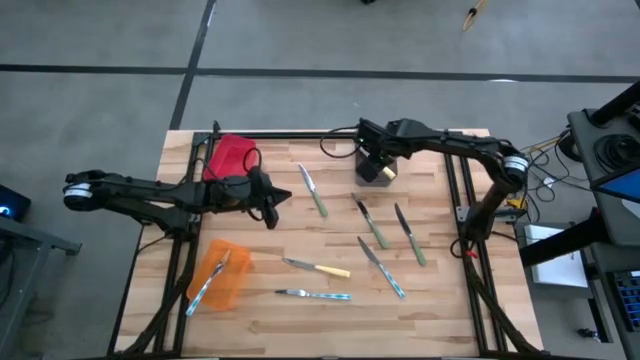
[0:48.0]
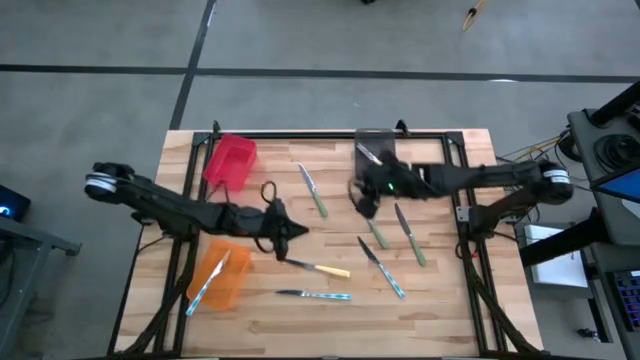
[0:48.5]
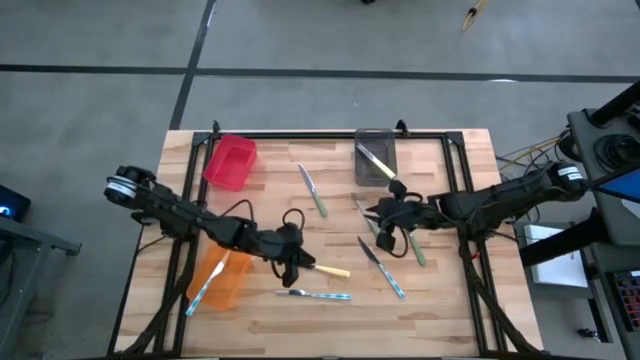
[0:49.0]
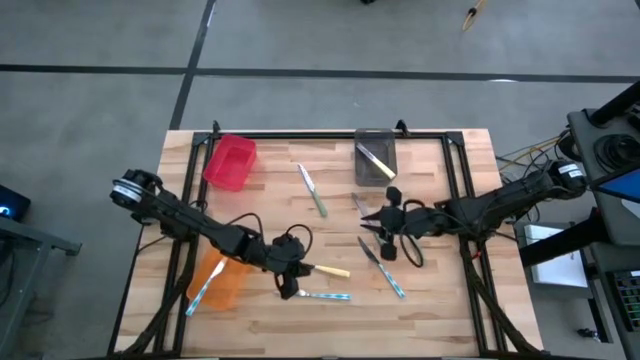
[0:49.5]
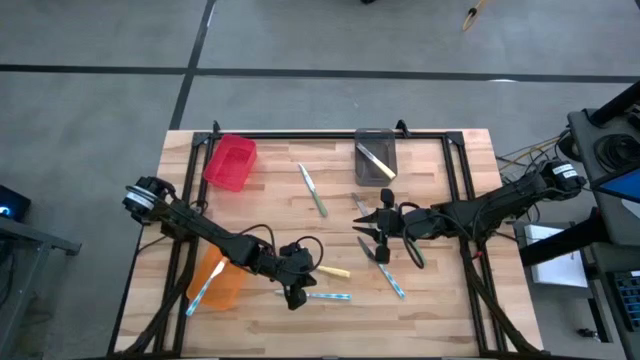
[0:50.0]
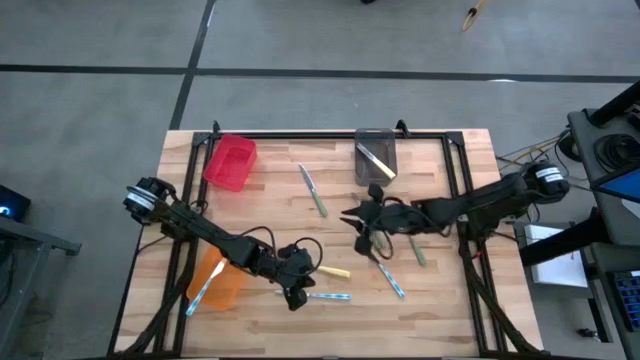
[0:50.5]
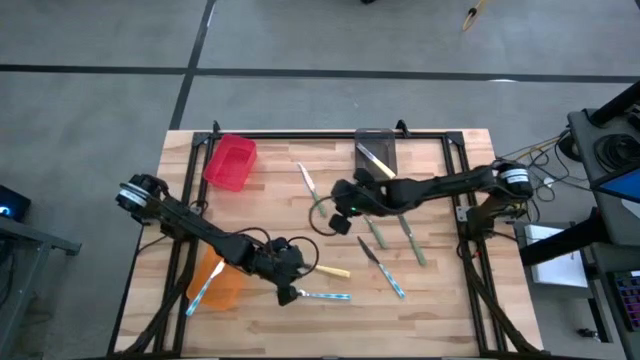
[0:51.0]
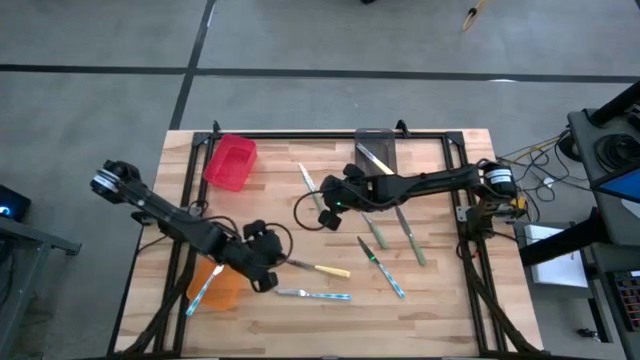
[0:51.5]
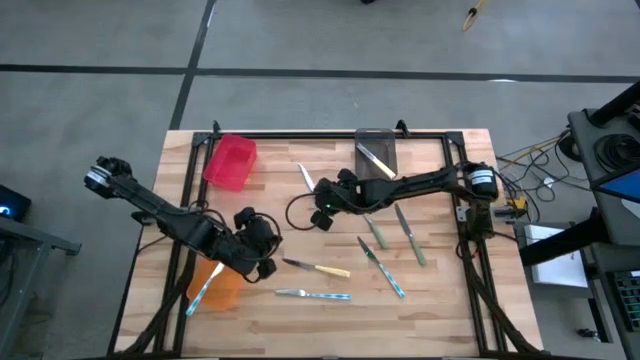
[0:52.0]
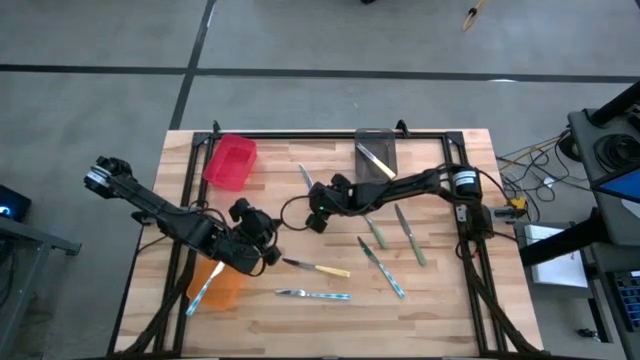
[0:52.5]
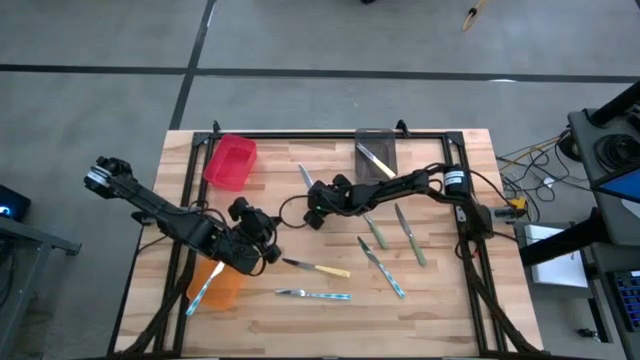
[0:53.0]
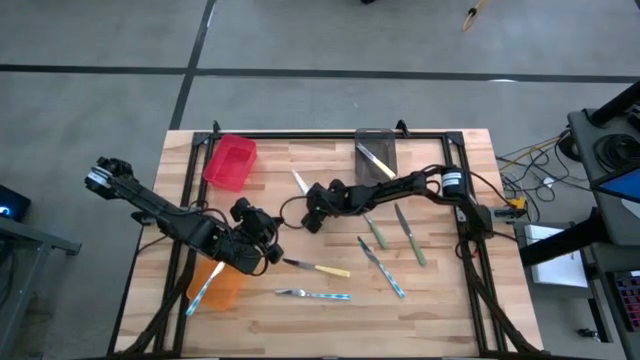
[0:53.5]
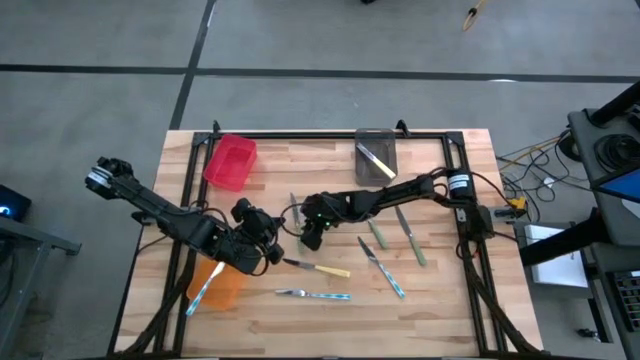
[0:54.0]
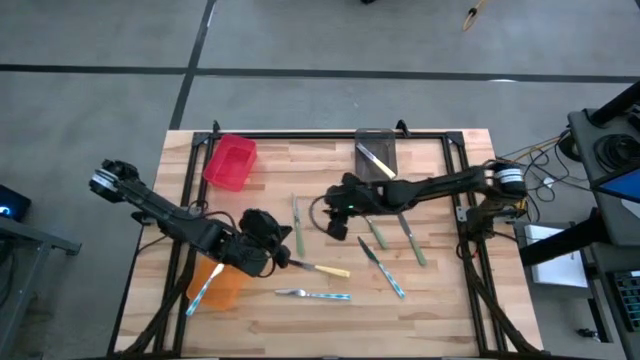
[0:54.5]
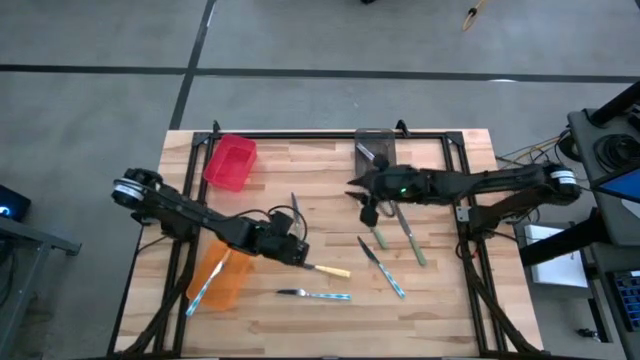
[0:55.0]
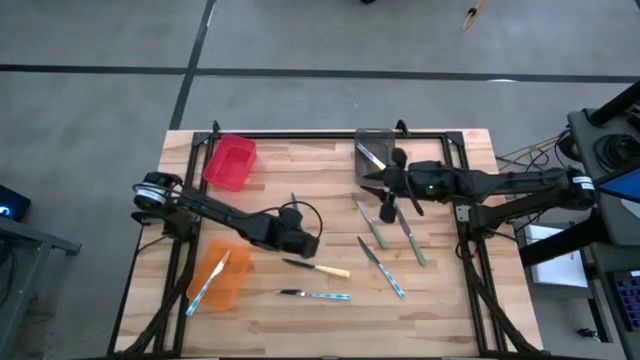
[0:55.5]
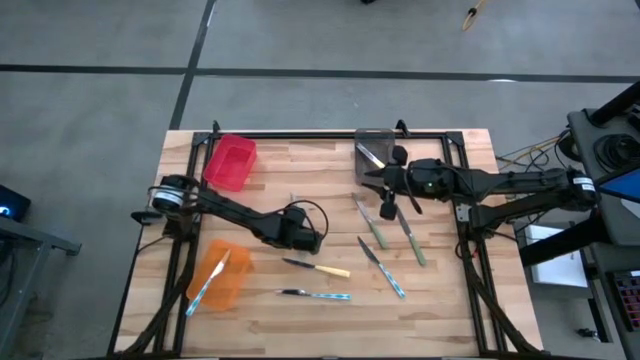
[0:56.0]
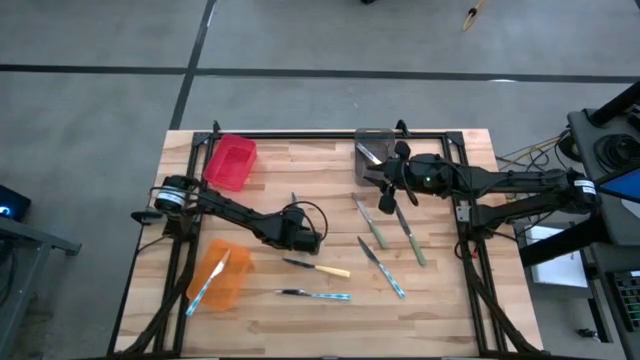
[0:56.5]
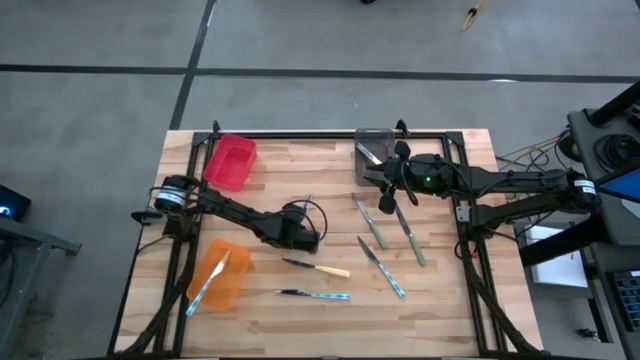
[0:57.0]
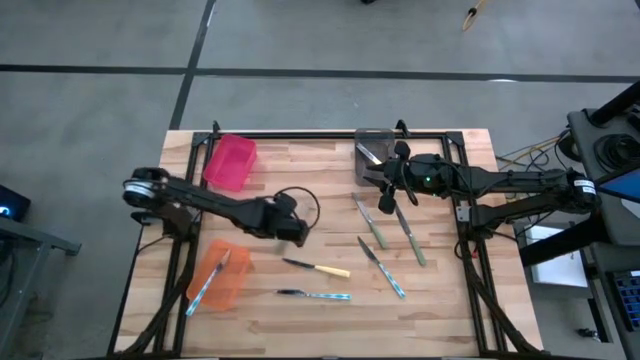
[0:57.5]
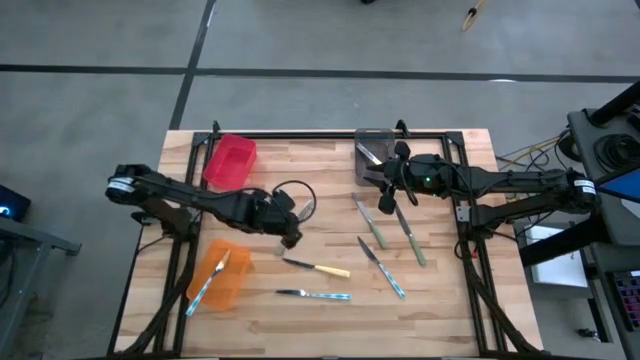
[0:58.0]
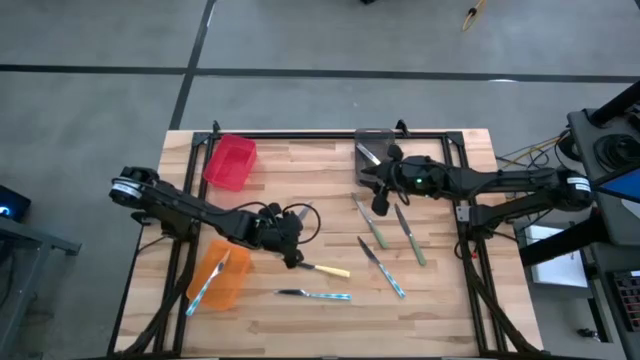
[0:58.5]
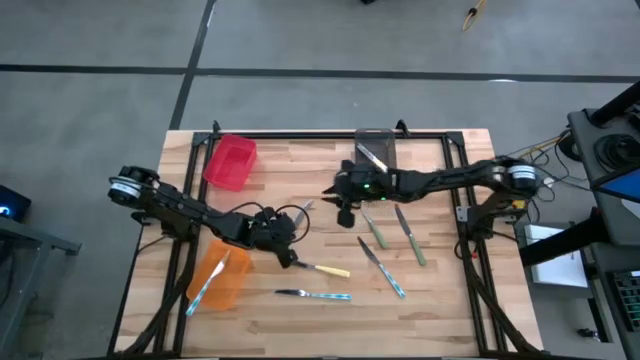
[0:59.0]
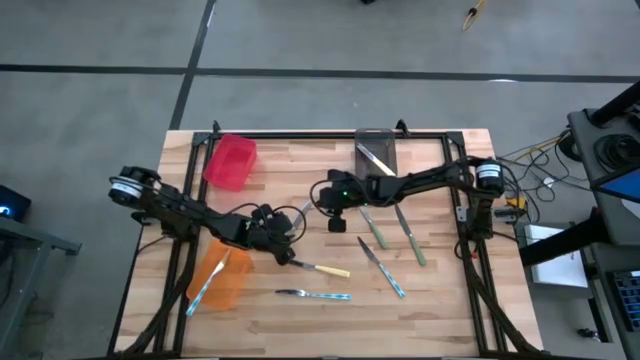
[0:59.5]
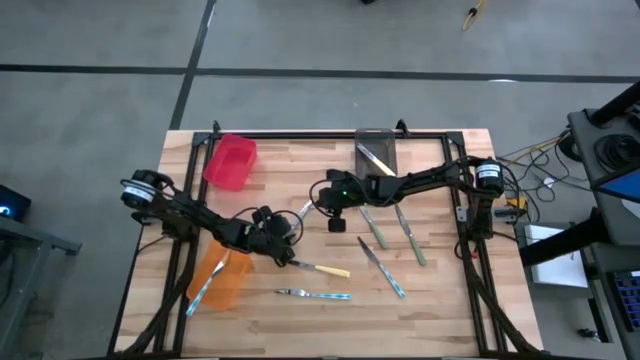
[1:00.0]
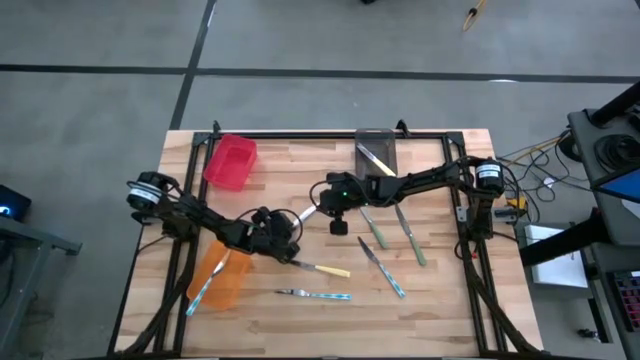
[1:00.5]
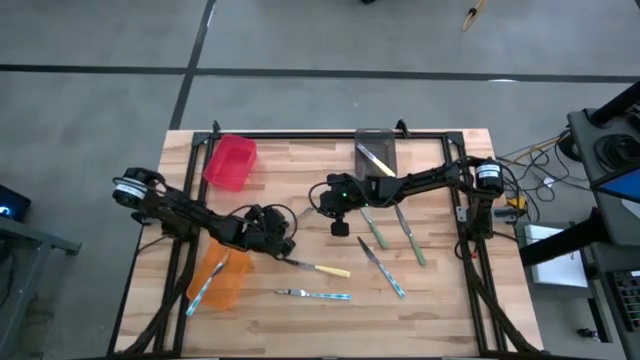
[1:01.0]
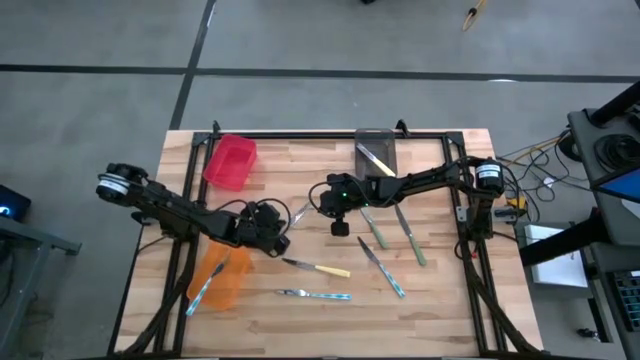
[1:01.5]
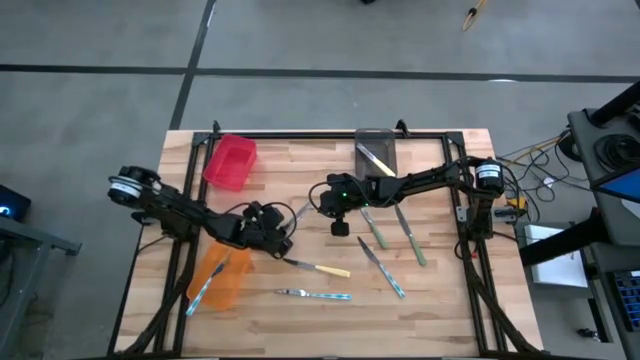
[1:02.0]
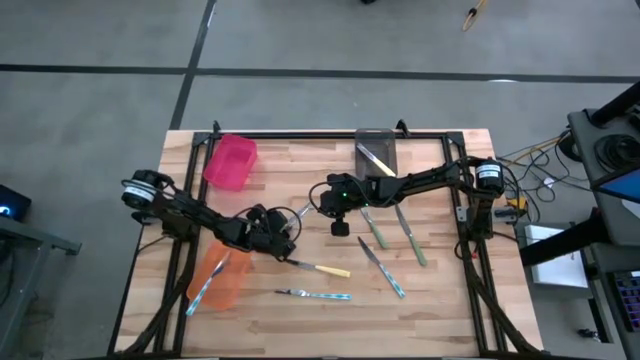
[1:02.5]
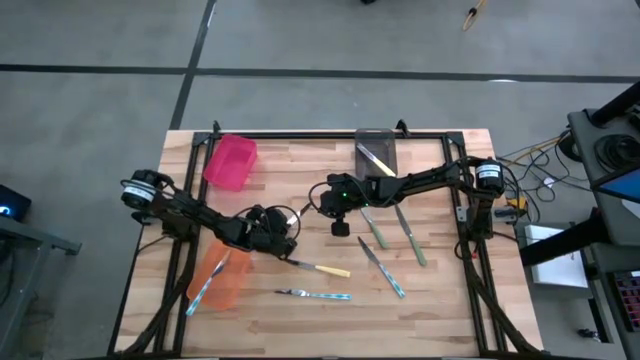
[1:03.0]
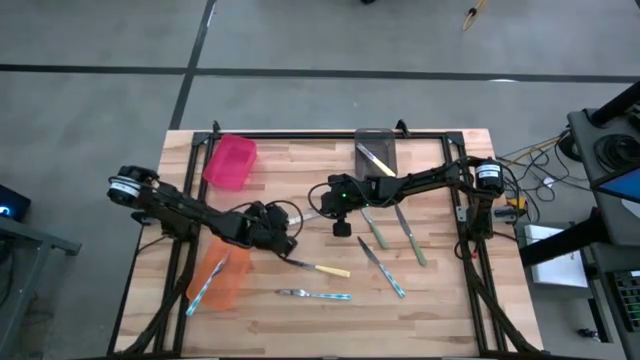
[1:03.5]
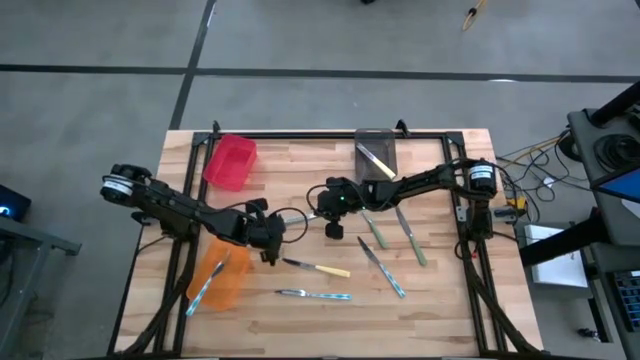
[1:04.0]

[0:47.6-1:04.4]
Task: Sort silverware by color (type)
Put the left green knife into the red bin

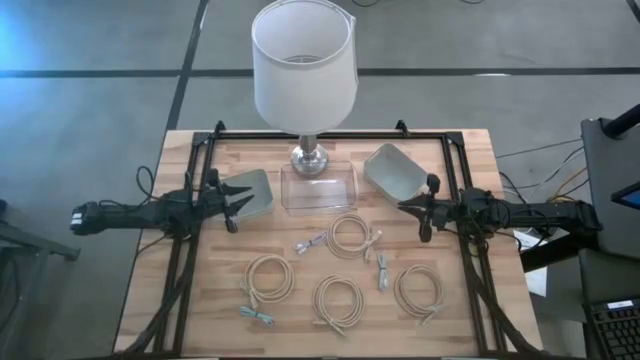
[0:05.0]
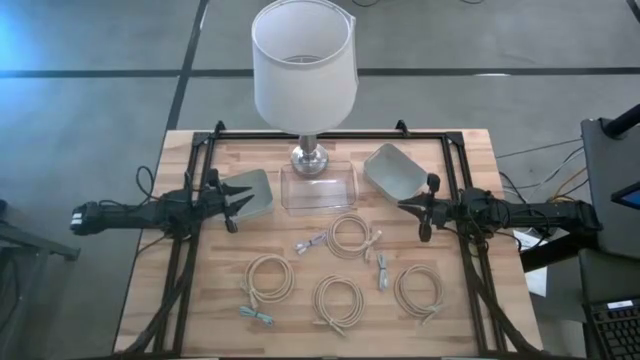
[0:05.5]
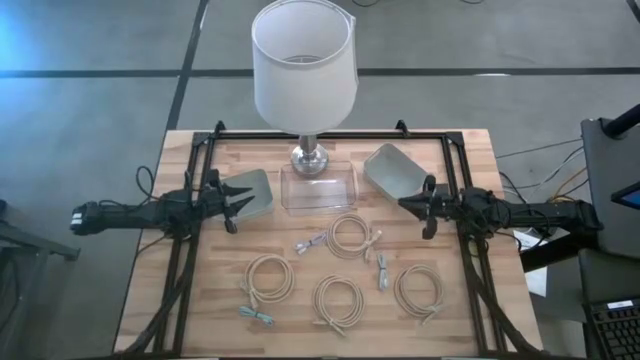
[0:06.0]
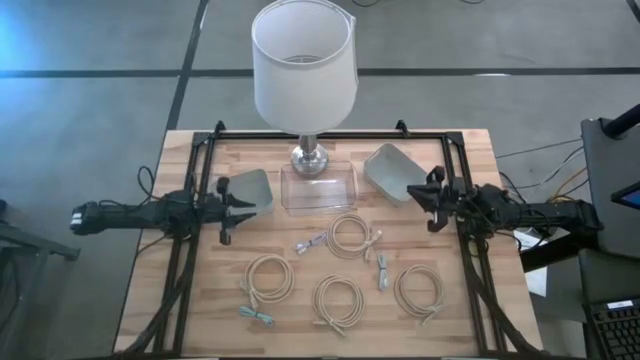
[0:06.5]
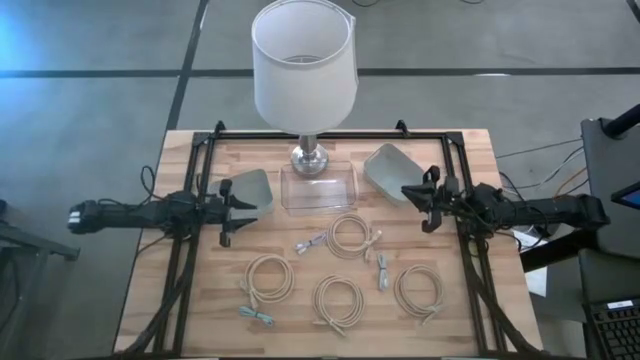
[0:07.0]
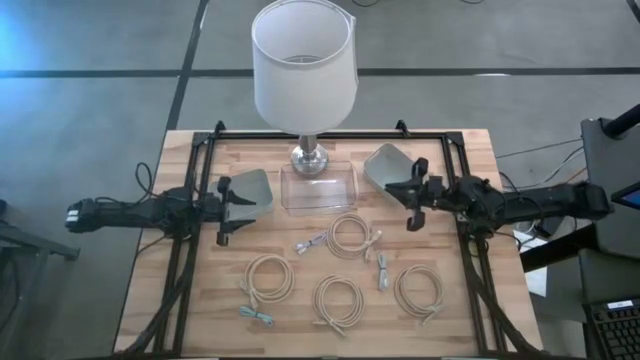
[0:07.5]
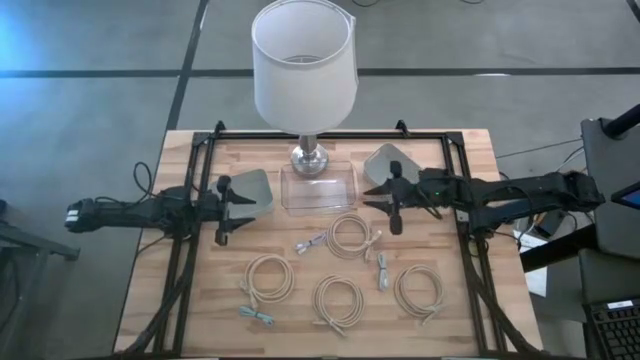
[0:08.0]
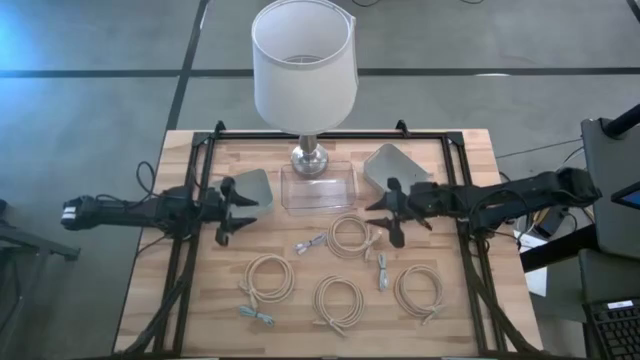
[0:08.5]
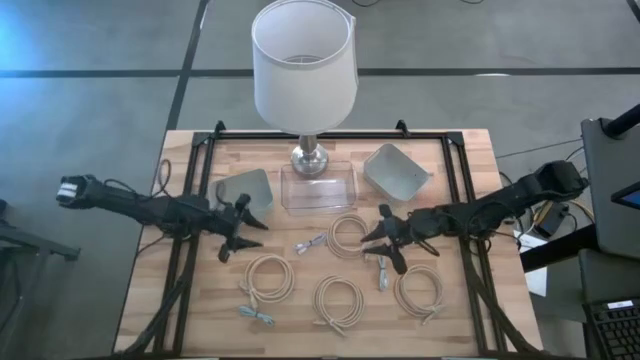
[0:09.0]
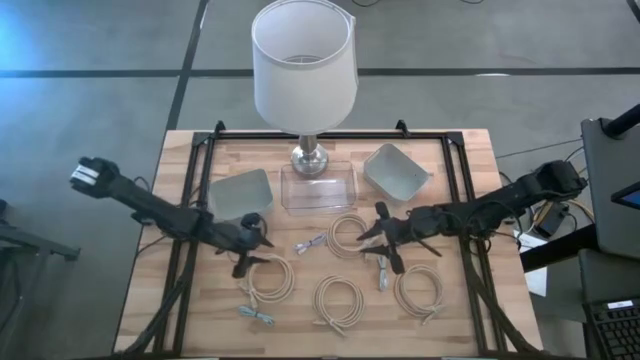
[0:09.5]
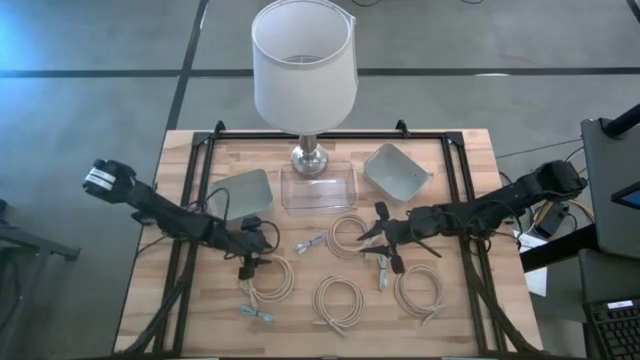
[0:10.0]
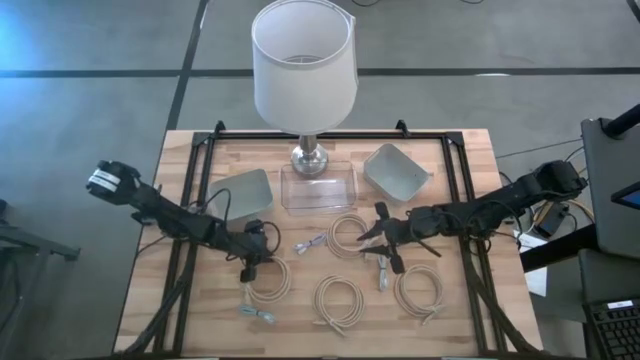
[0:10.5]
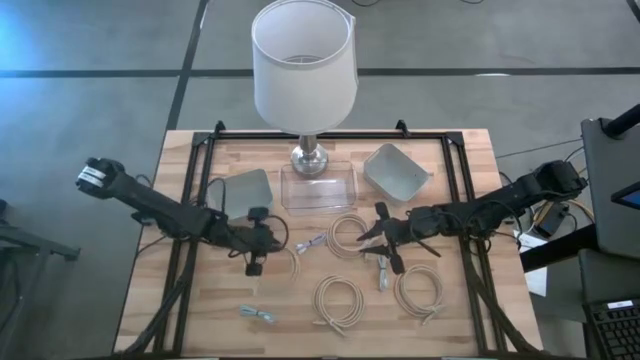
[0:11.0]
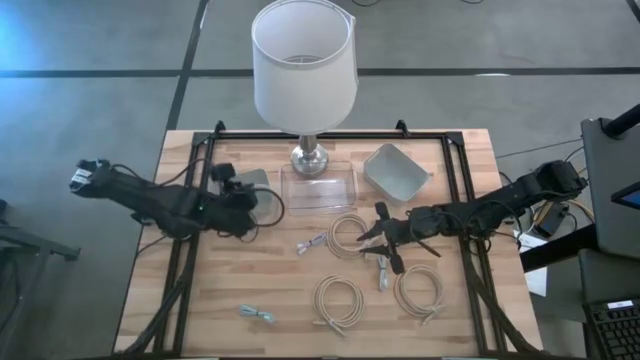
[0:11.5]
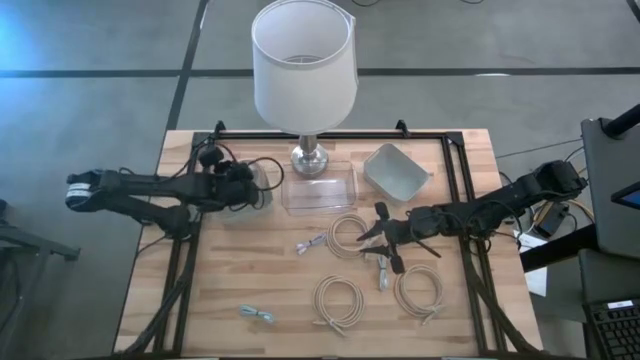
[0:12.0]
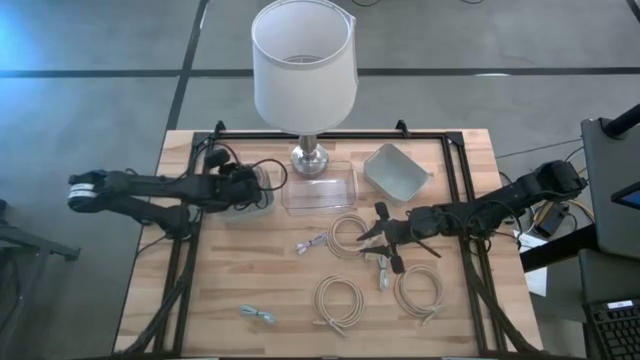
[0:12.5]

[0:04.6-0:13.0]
Task: Pick & Place USB Port
Put the light brown hdmi cable into the left gray bin
